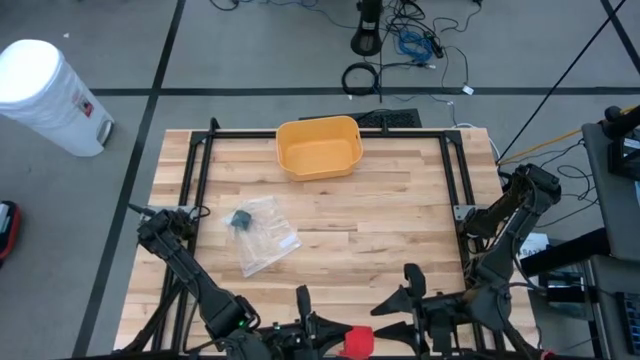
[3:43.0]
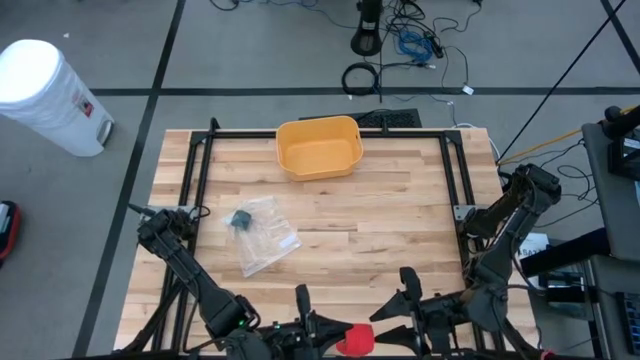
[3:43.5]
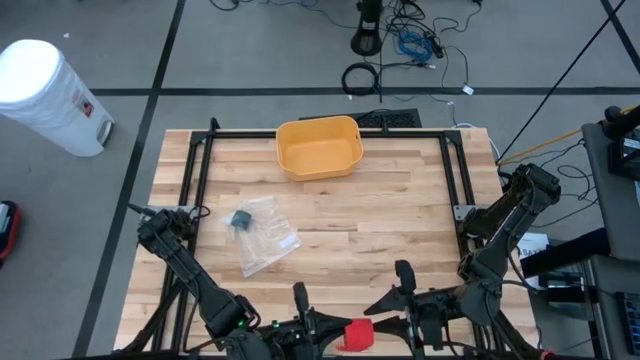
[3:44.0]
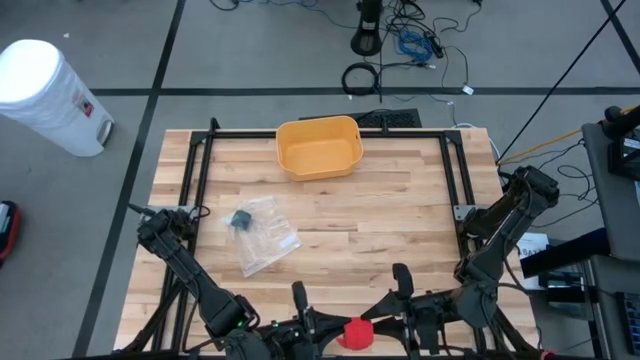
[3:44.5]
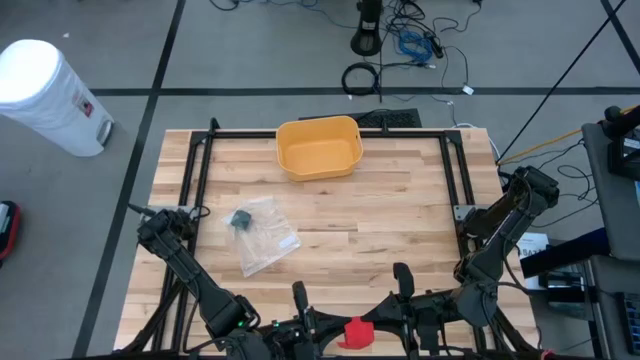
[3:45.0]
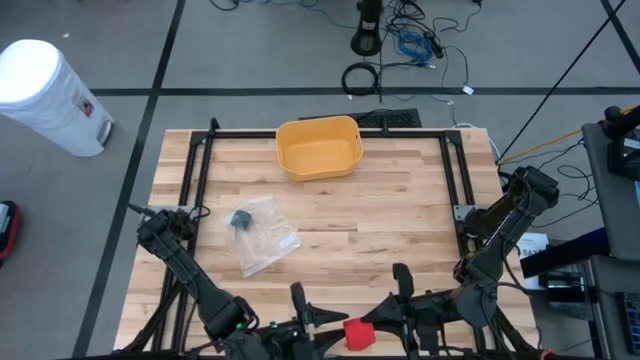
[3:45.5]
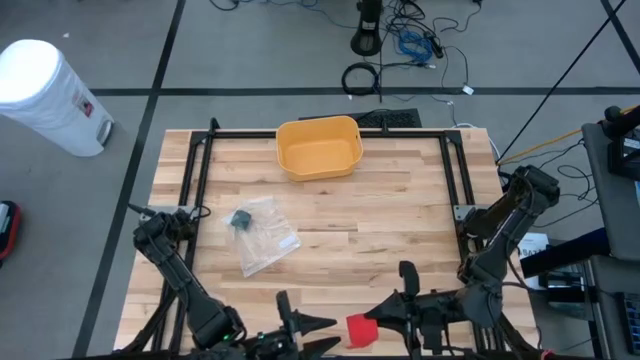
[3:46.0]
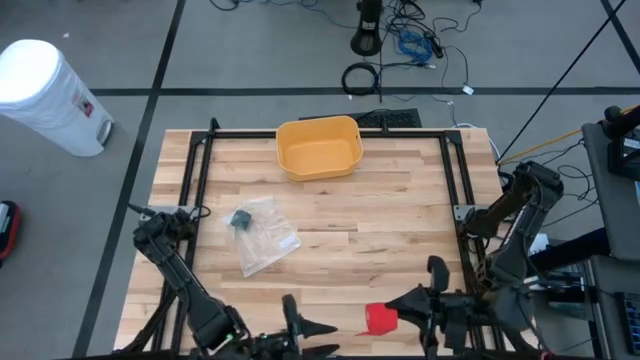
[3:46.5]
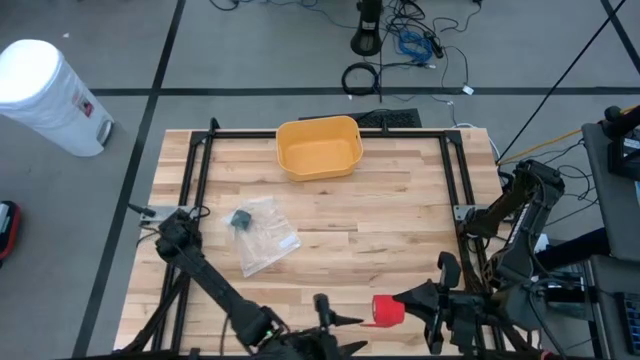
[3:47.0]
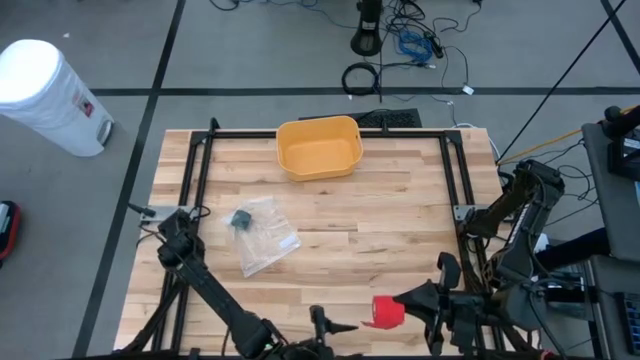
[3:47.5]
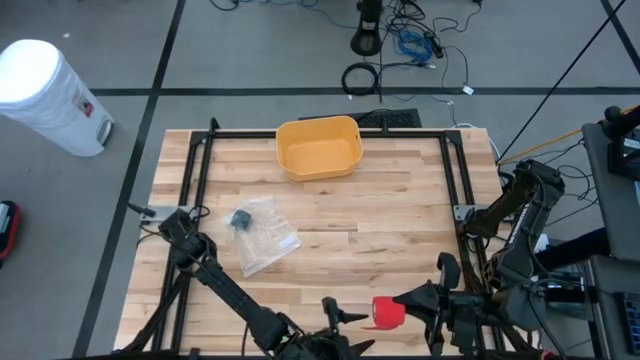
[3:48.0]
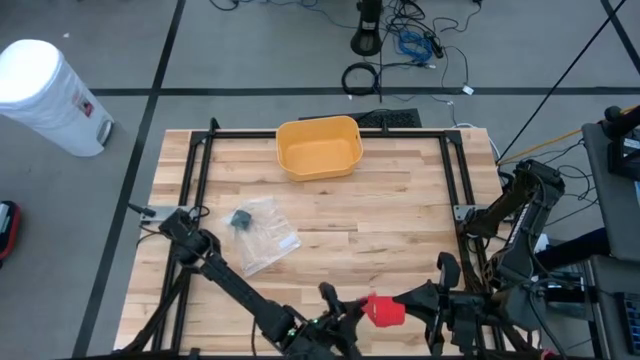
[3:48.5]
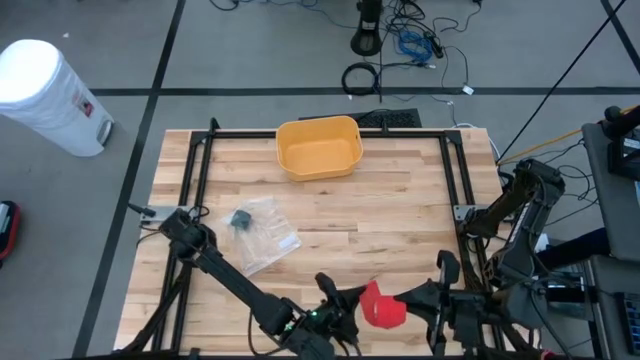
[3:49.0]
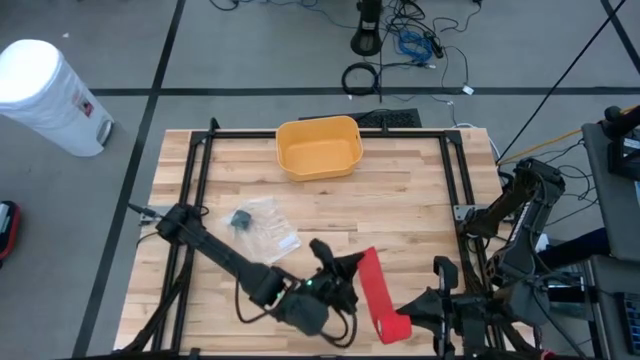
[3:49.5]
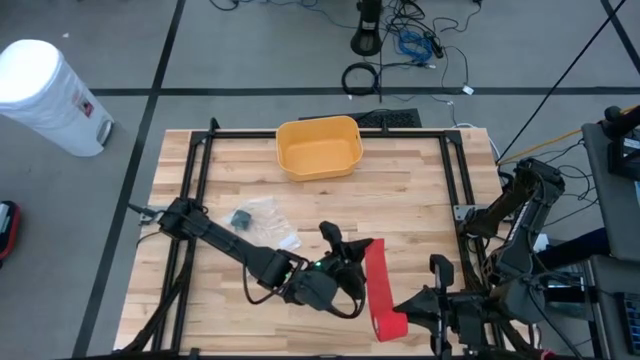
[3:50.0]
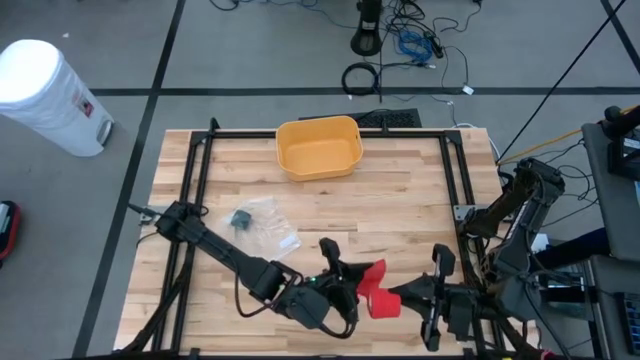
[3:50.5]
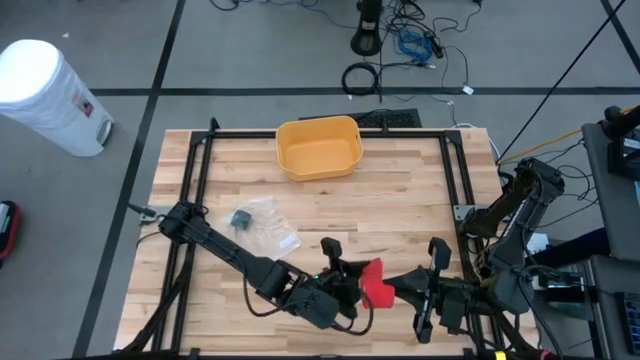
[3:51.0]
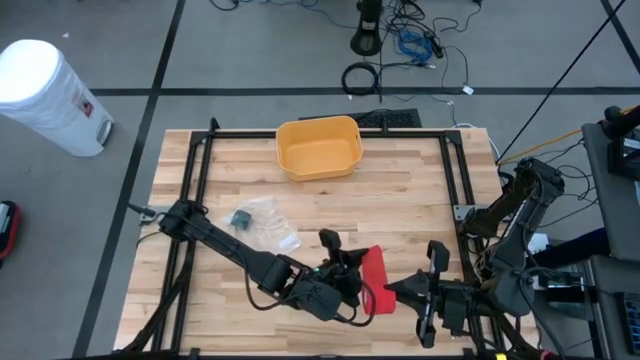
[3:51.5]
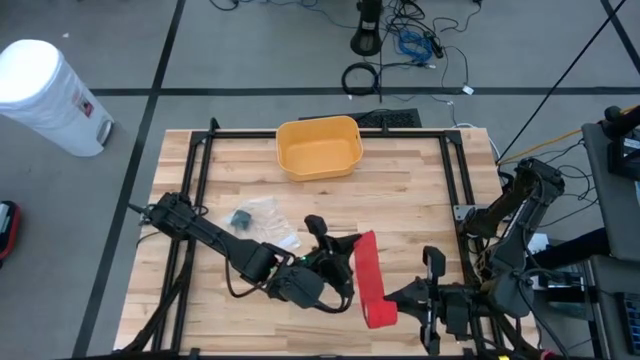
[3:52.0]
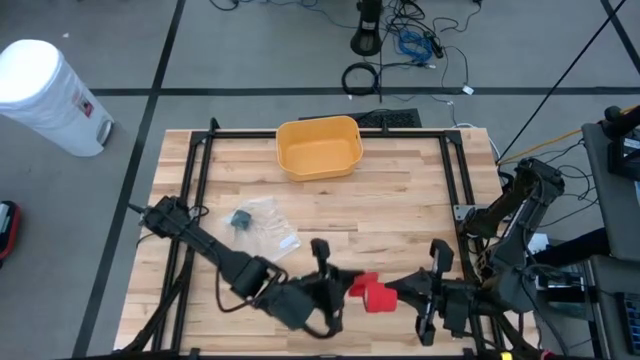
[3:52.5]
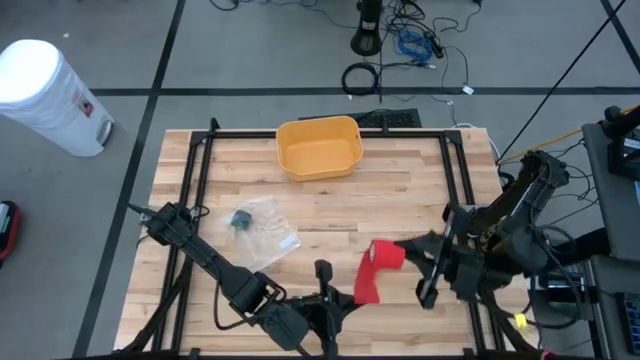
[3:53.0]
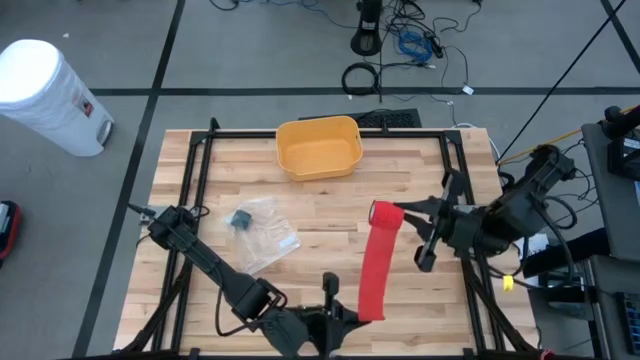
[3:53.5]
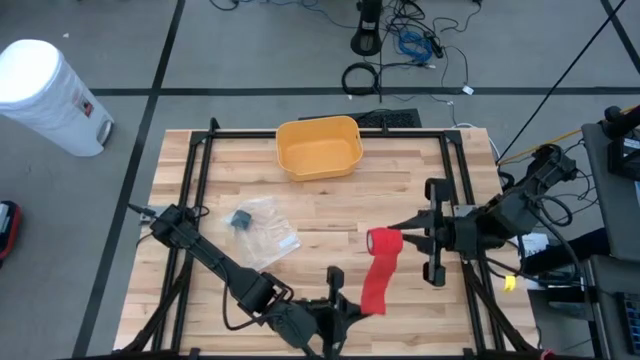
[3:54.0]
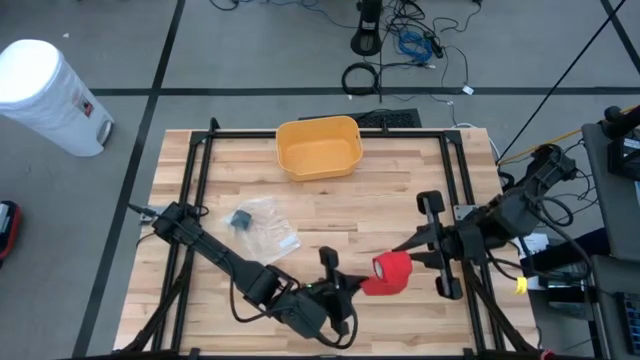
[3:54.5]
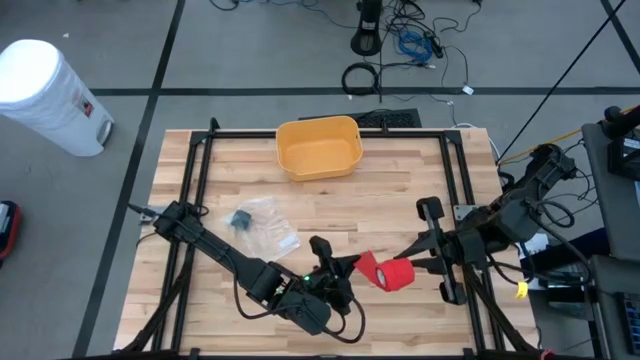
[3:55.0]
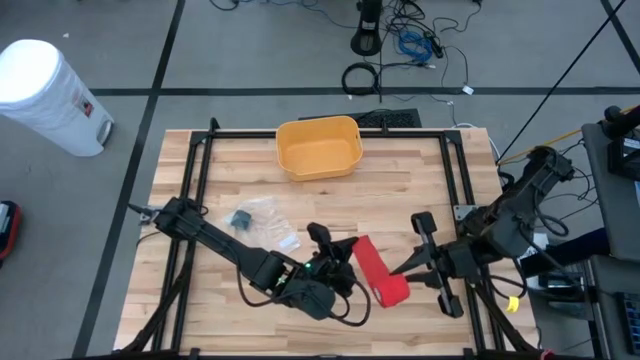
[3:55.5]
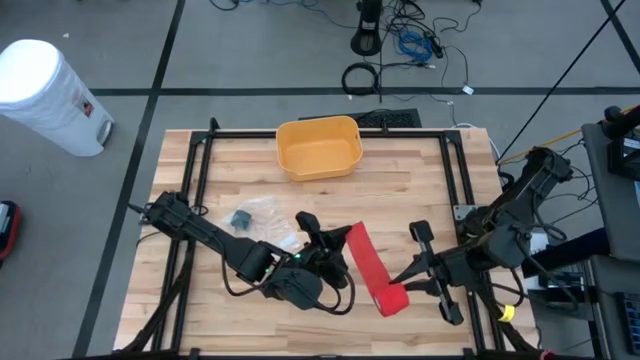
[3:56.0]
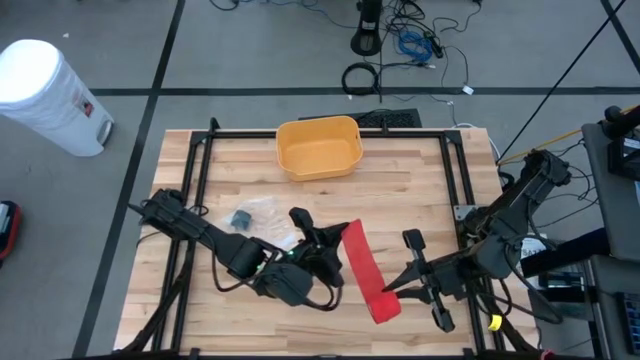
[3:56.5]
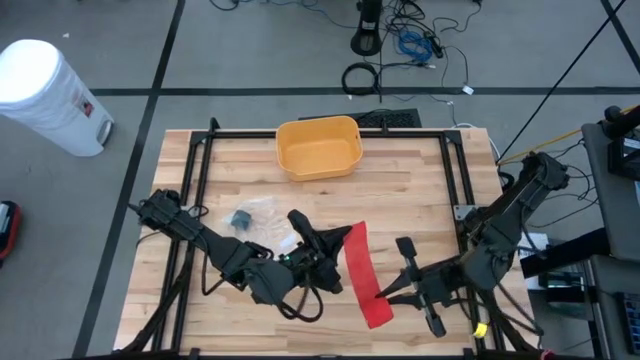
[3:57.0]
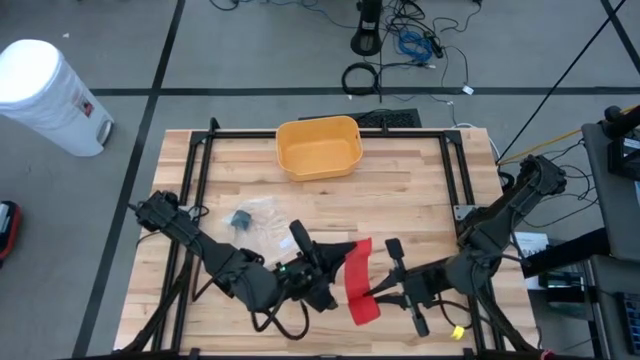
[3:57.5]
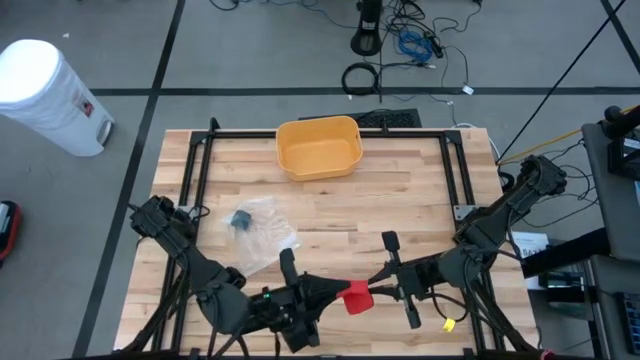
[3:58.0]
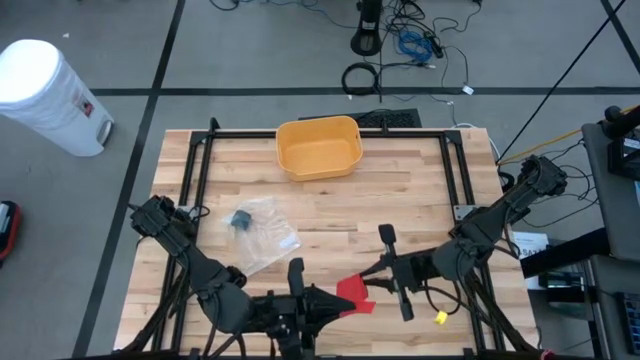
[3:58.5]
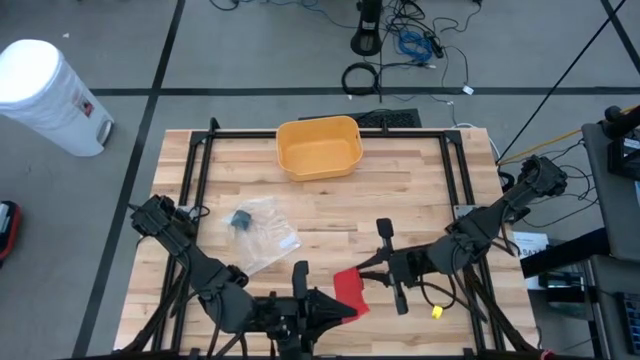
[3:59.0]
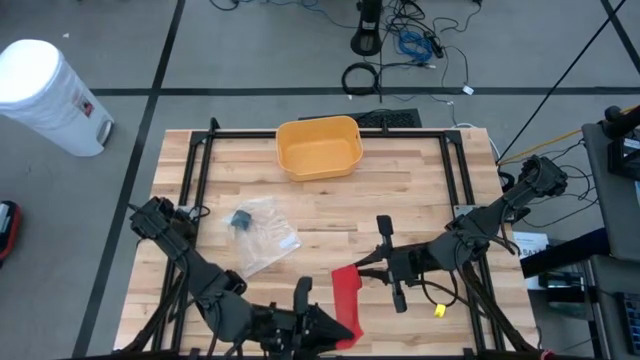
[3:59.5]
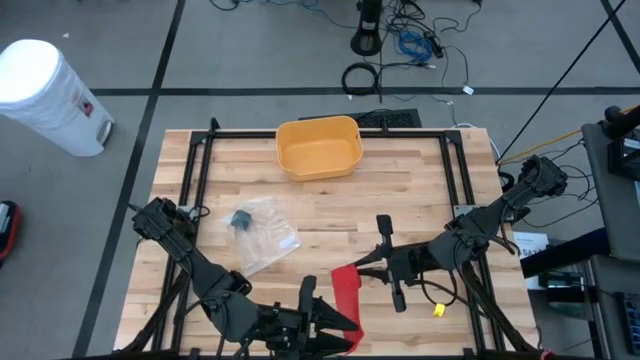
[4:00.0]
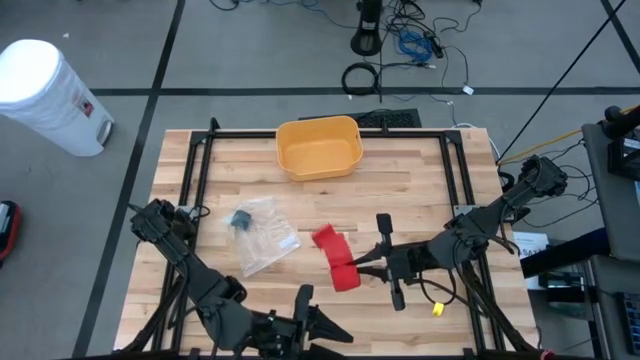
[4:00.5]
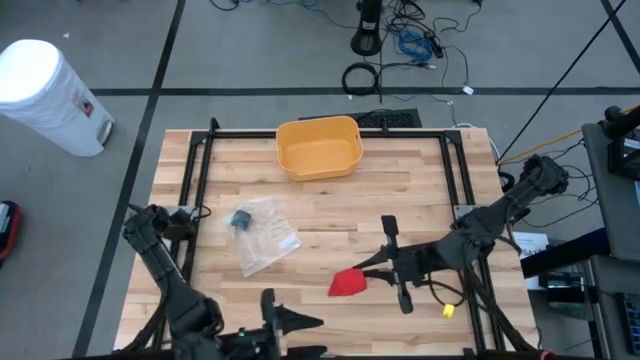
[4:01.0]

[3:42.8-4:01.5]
Task: Roll bandage
Roll the red bandage

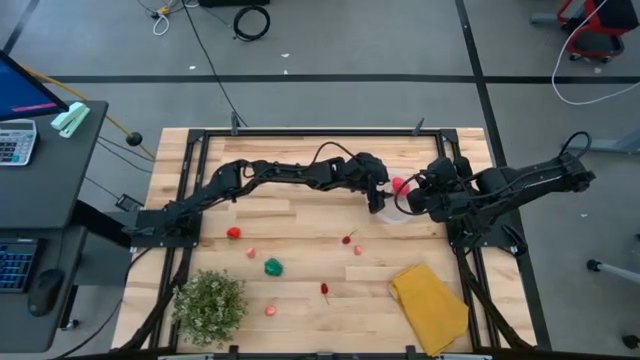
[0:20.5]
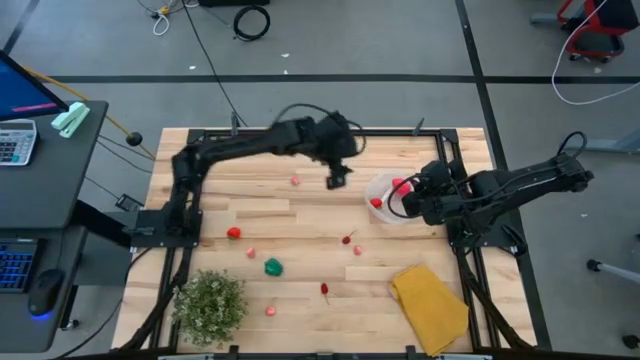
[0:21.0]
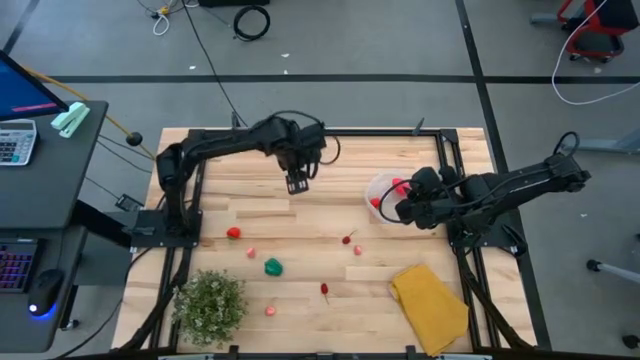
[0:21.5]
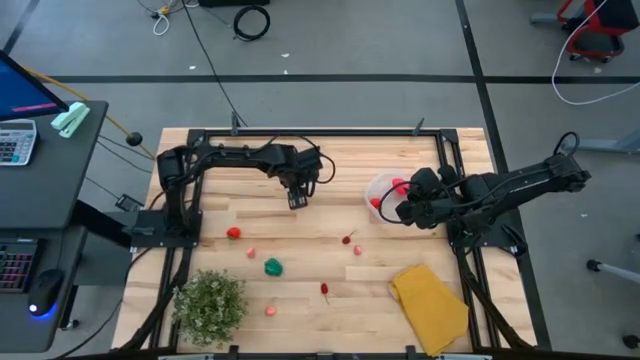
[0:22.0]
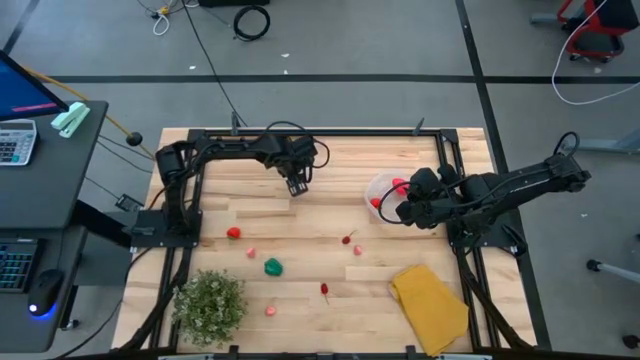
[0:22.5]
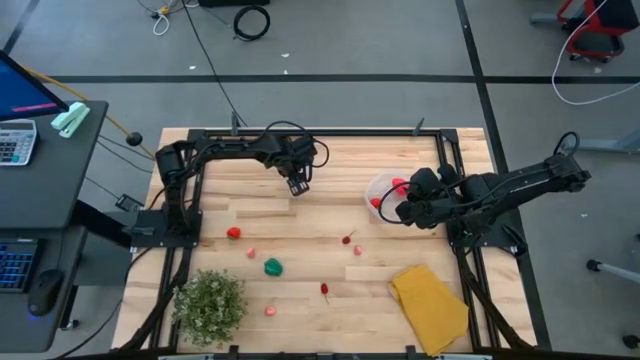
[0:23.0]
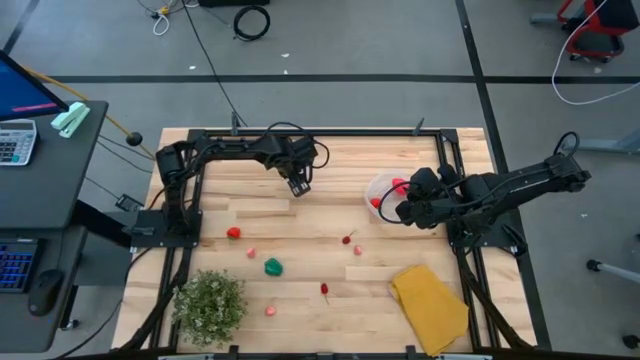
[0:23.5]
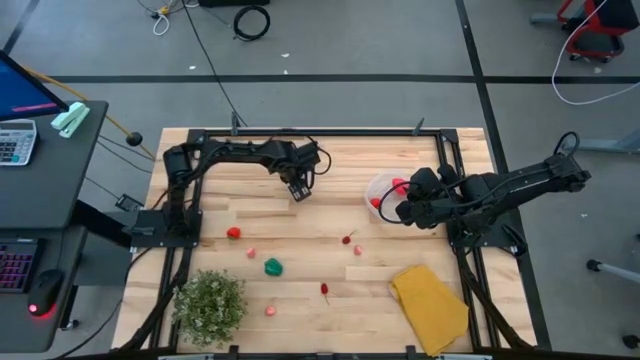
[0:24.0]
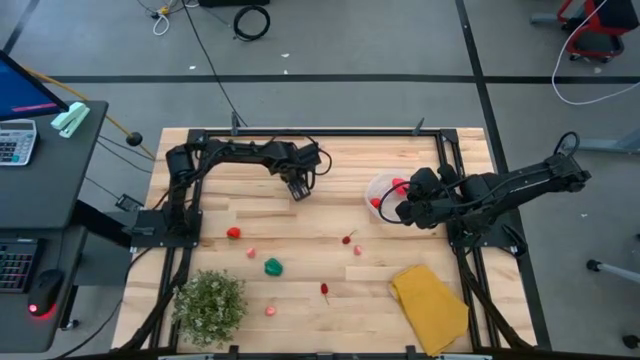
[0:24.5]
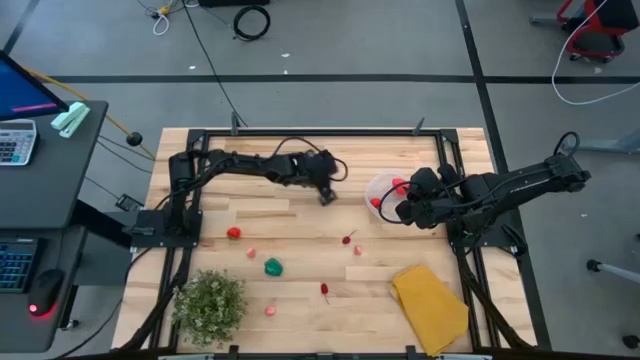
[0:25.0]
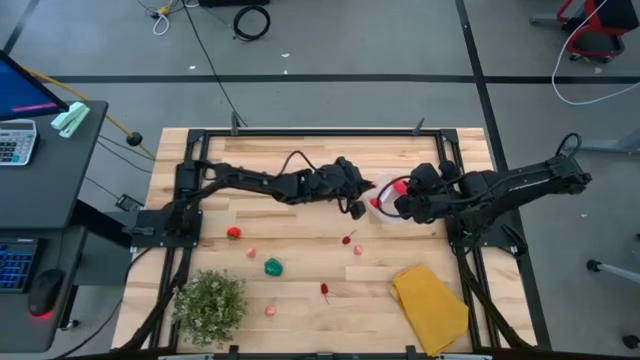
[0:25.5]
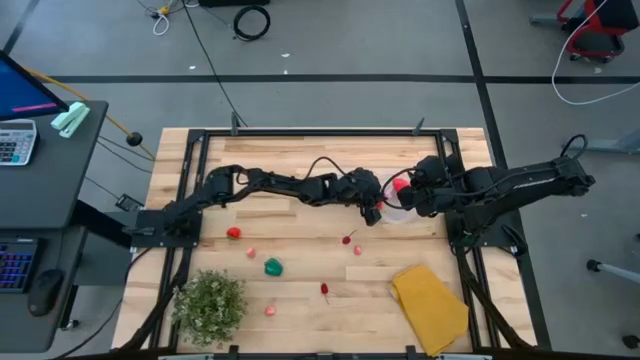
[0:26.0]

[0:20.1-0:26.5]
Task: Pick and placing Produce into tupperware
Put the pink peach into the transparent container
